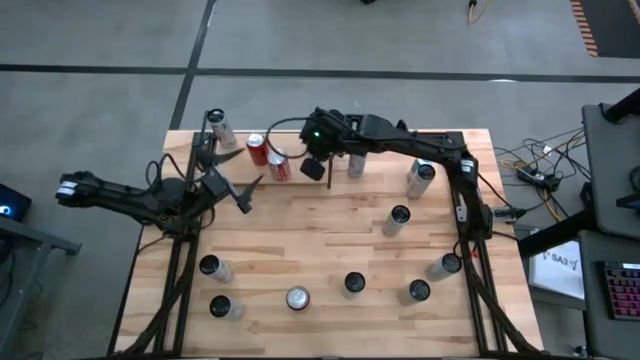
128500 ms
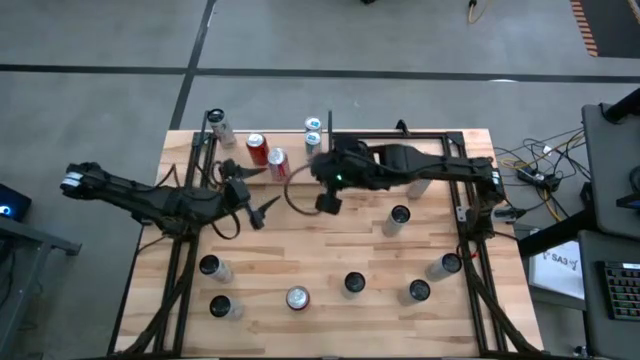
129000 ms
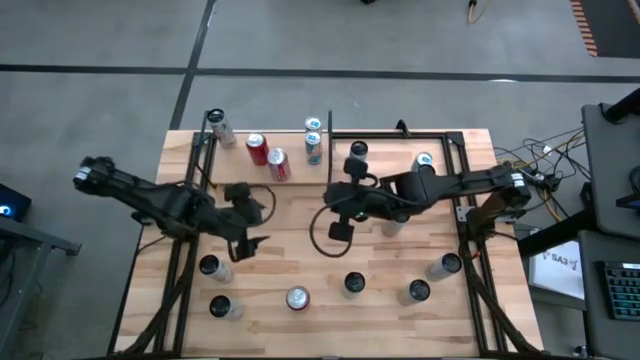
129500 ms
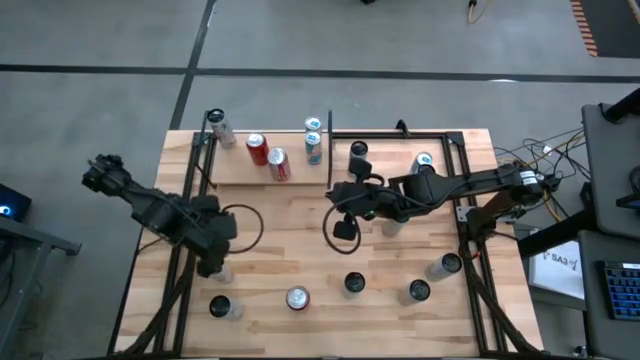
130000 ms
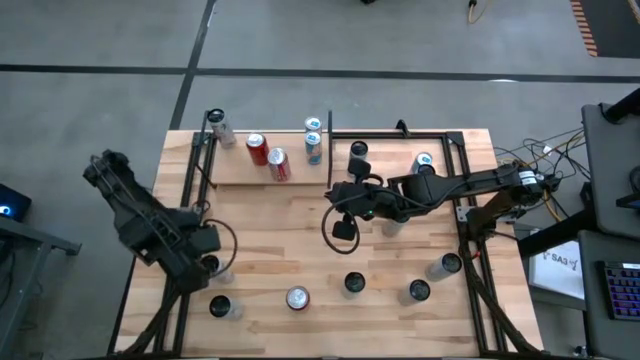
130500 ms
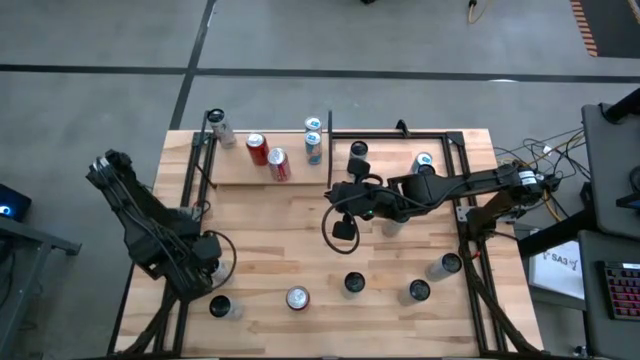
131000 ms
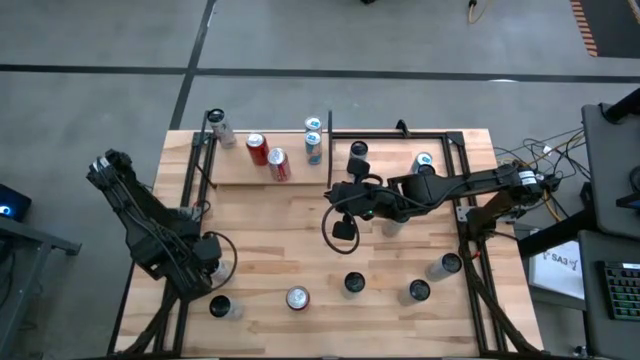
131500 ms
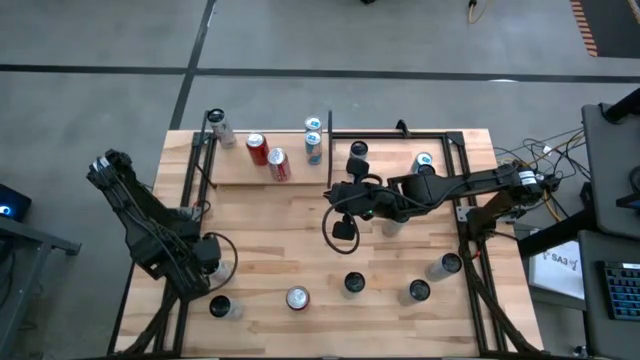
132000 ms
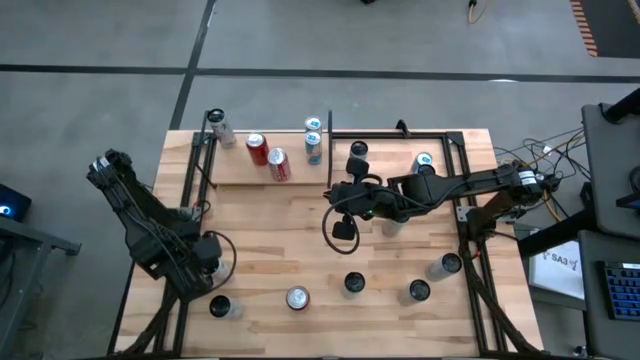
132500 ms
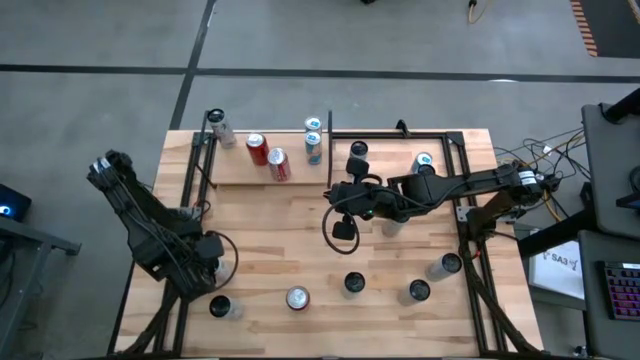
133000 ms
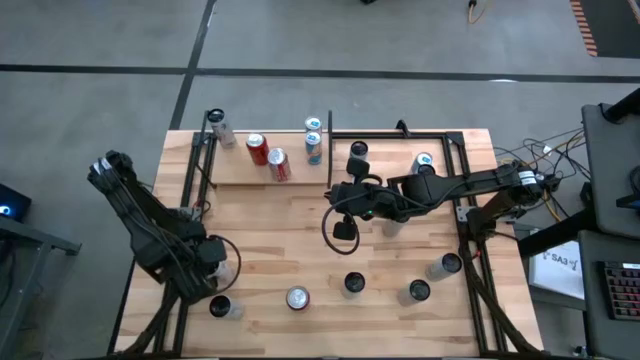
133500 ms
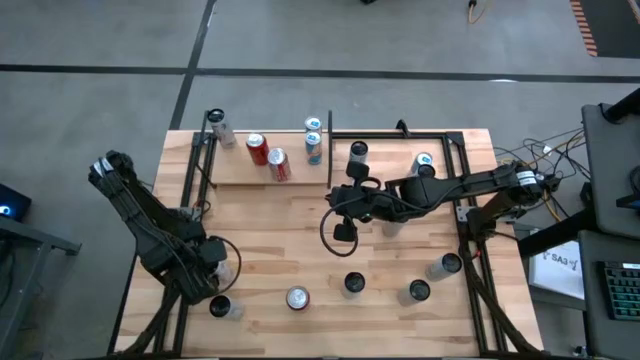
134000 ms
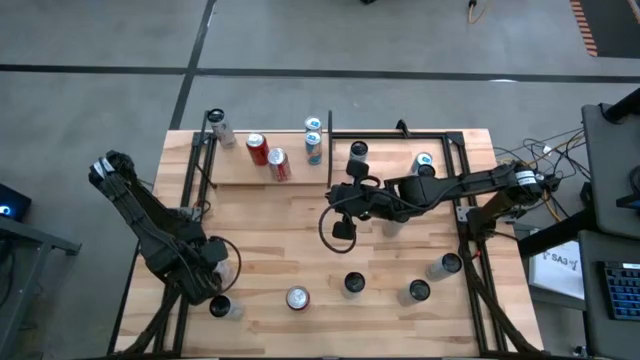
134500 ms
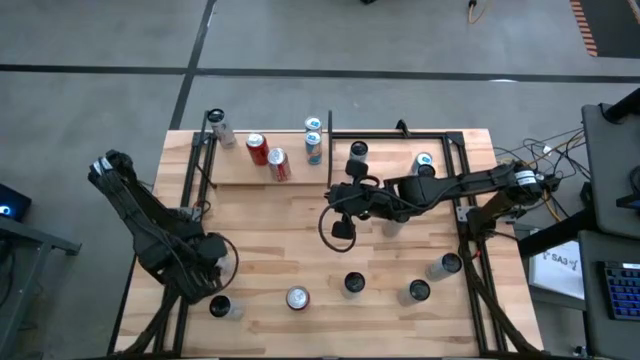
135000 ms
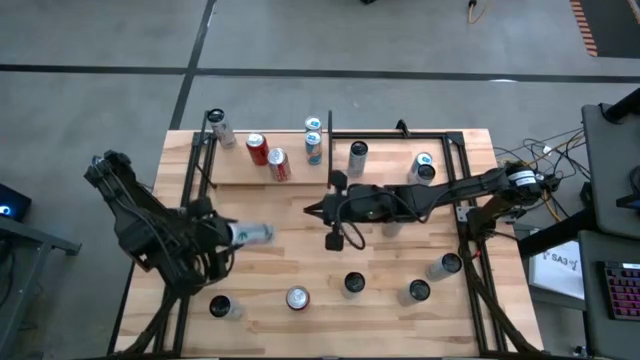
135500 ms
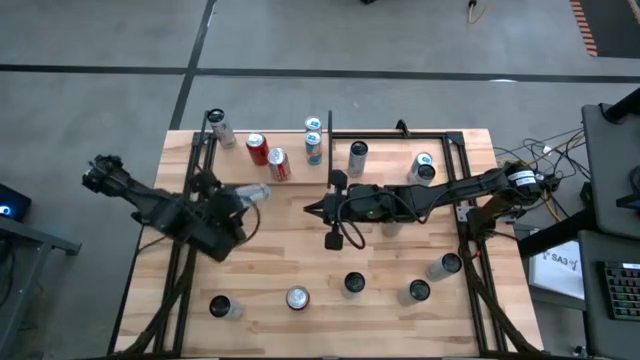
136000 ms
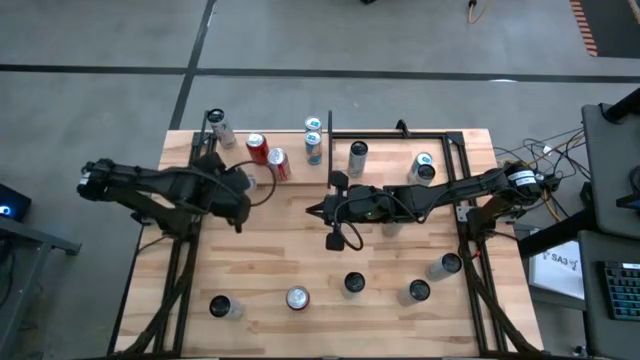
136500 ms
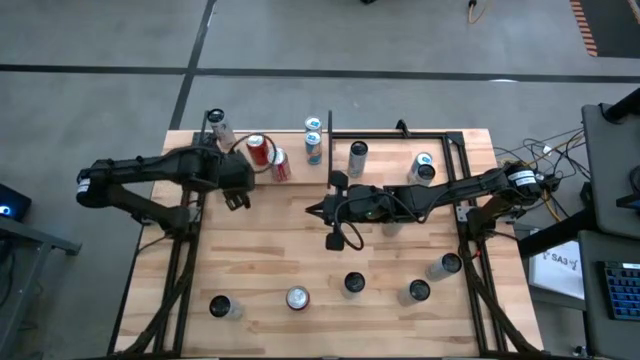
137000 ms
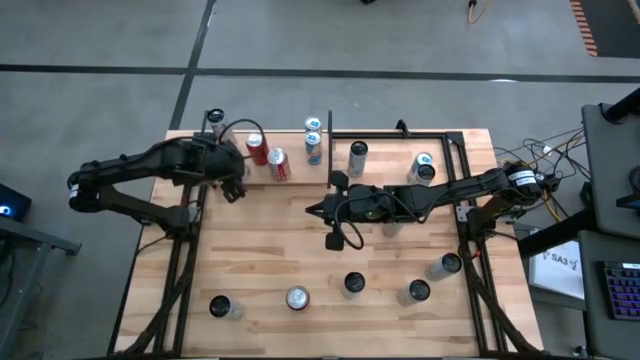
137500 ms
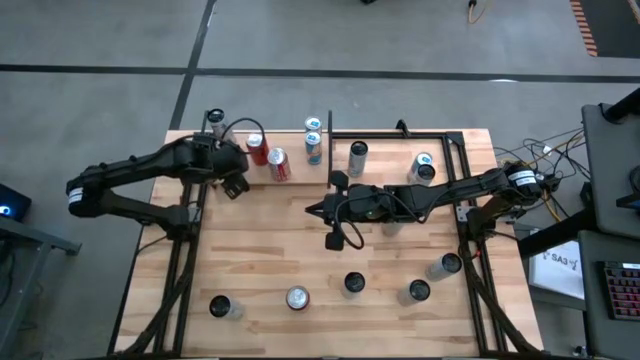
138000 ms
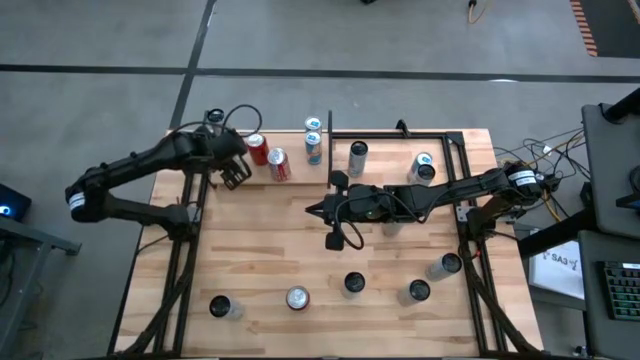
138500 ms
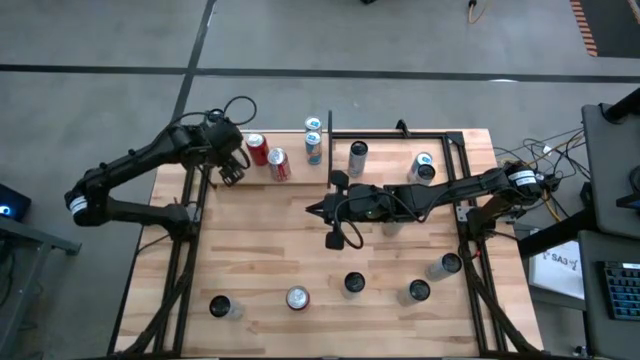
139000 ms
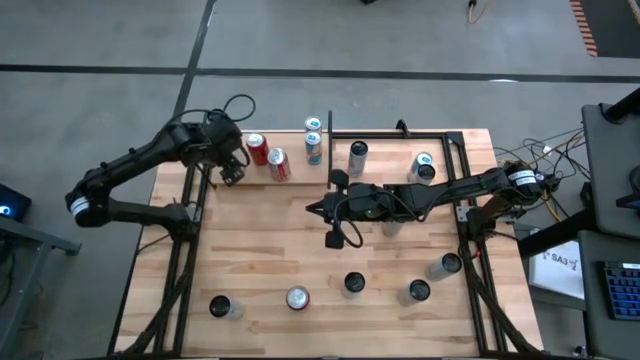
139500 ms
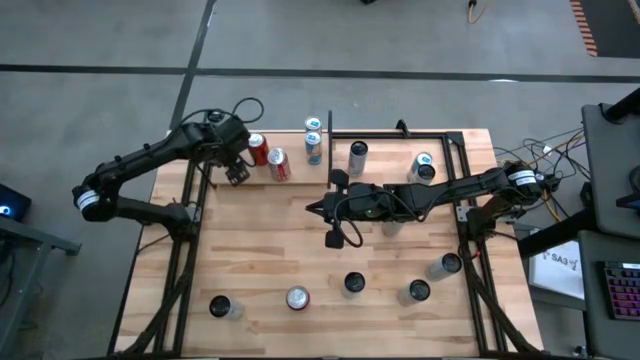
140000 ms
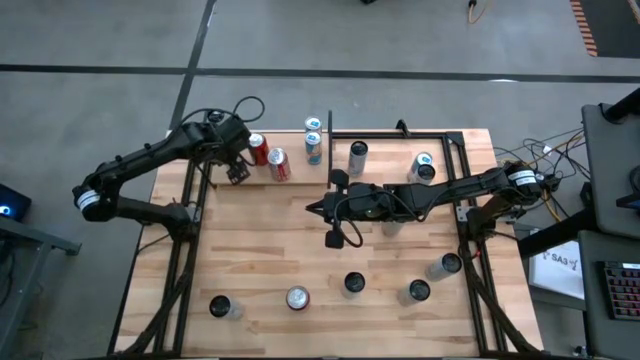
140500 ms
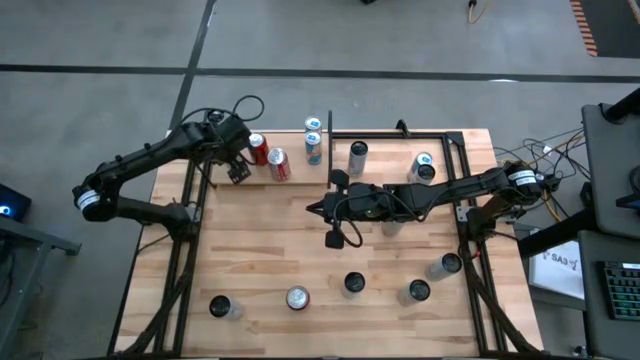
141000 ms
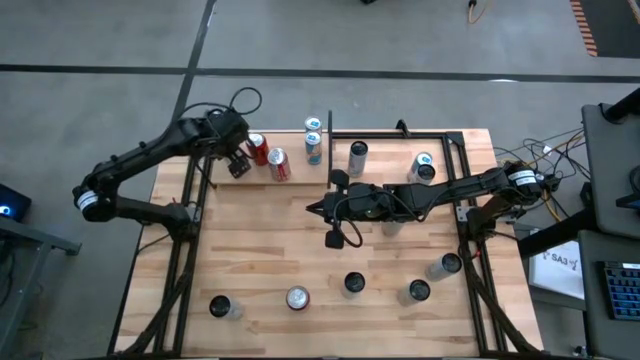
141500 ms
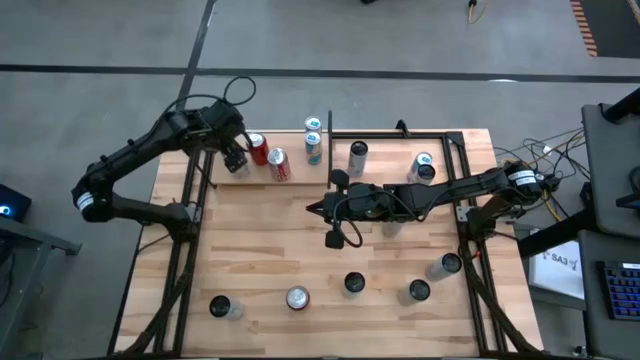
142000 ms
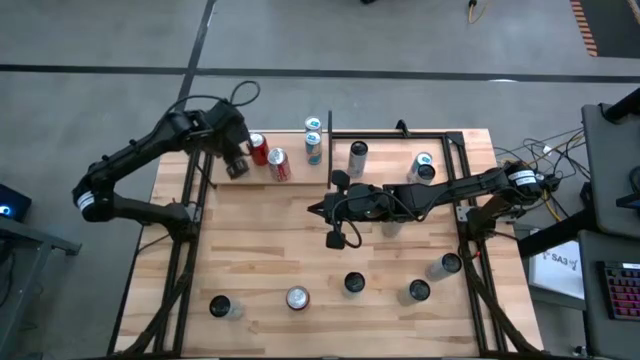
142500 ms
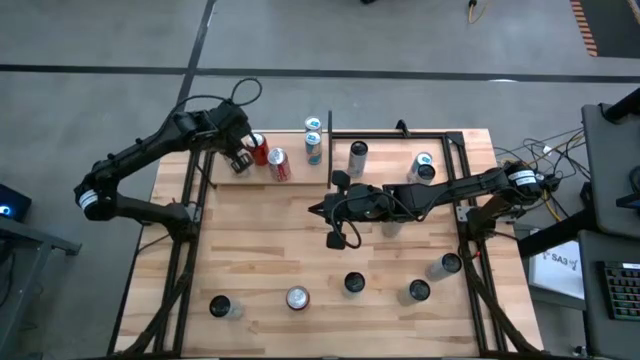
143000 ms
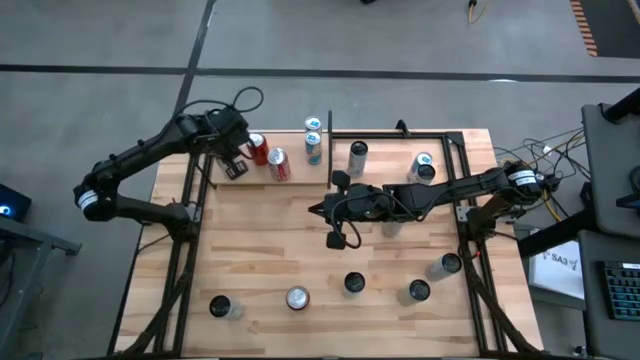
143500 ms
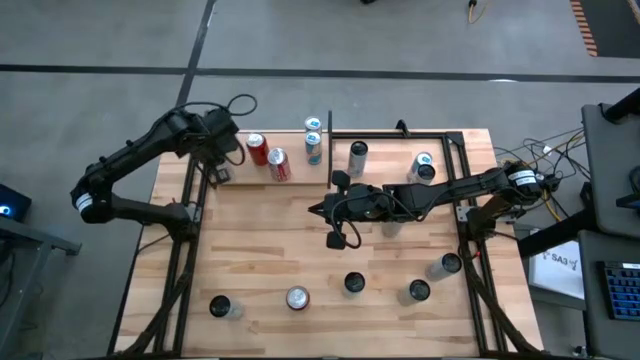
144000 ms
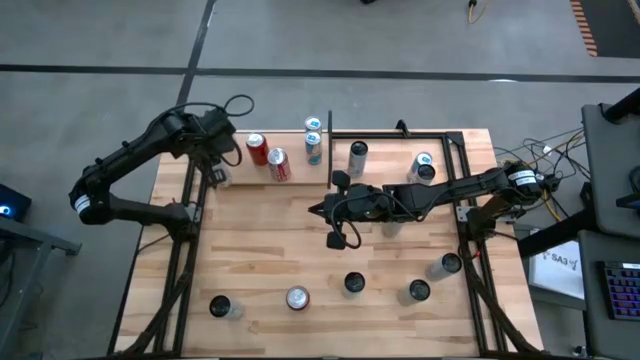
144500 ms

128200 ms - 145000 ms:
Task: Place canned beverage on shelf
Put the top white and pink soda can on the shelf aligned with the other white and pink soda can

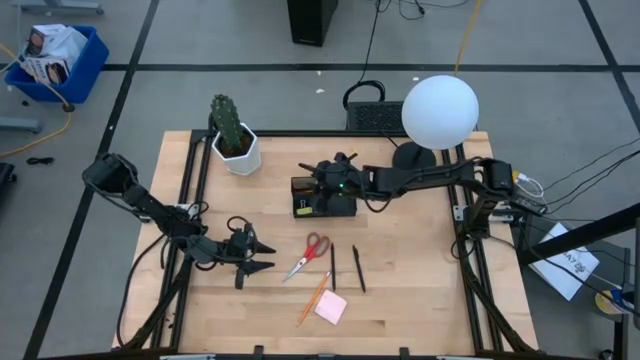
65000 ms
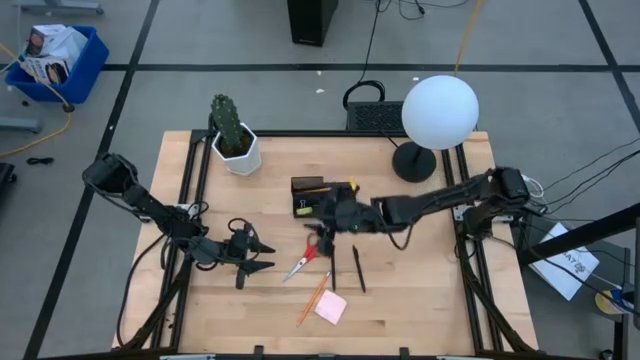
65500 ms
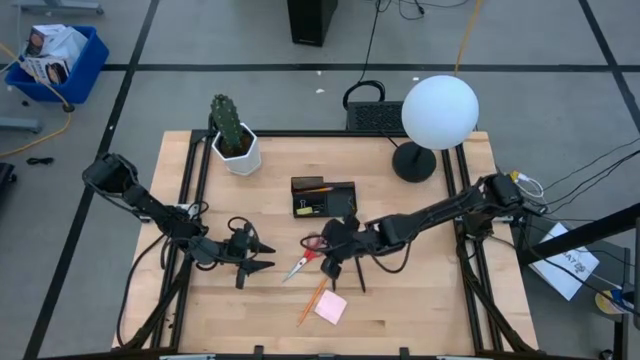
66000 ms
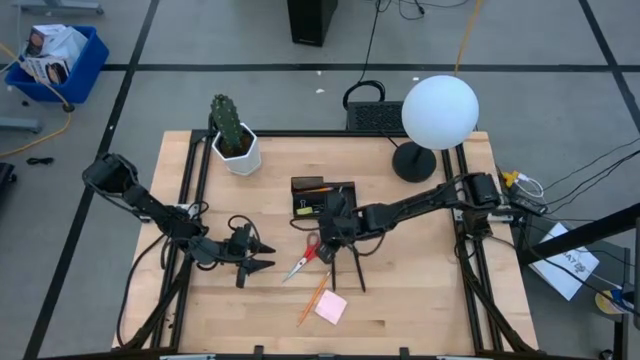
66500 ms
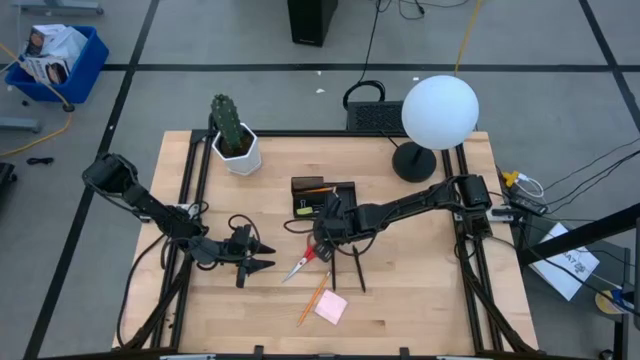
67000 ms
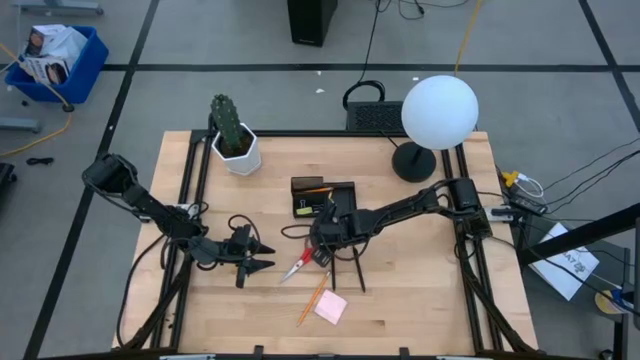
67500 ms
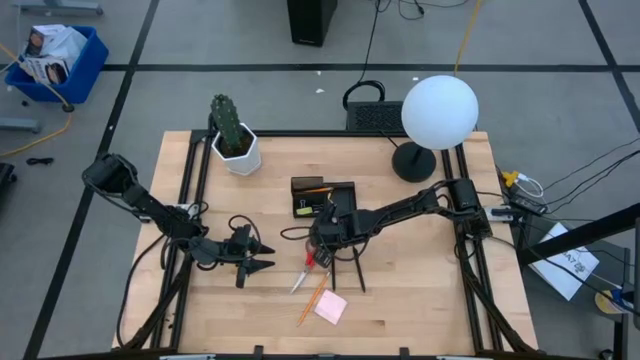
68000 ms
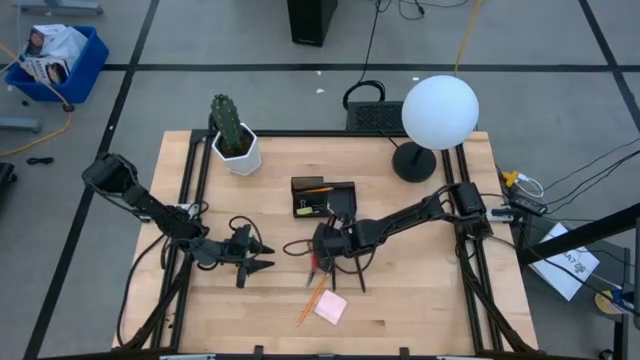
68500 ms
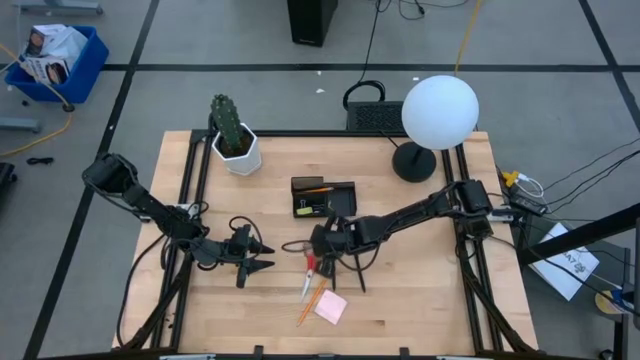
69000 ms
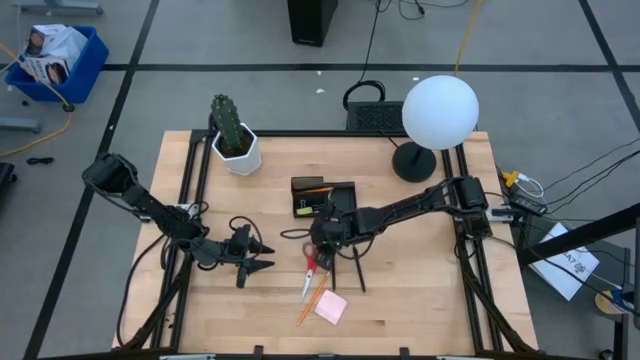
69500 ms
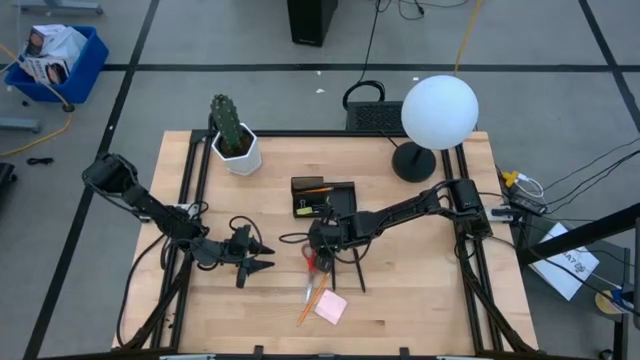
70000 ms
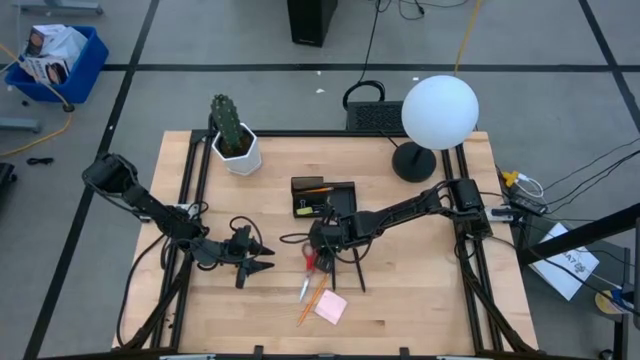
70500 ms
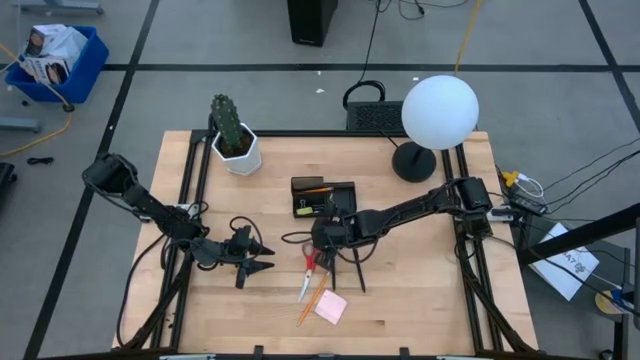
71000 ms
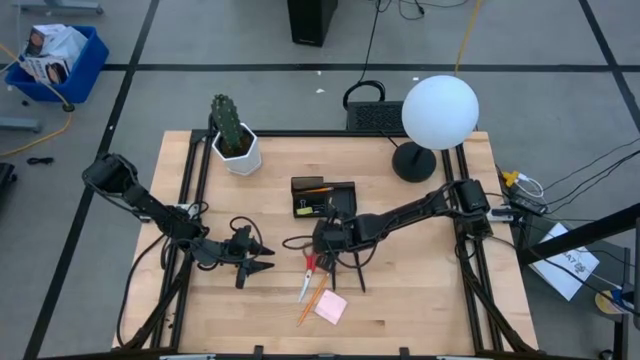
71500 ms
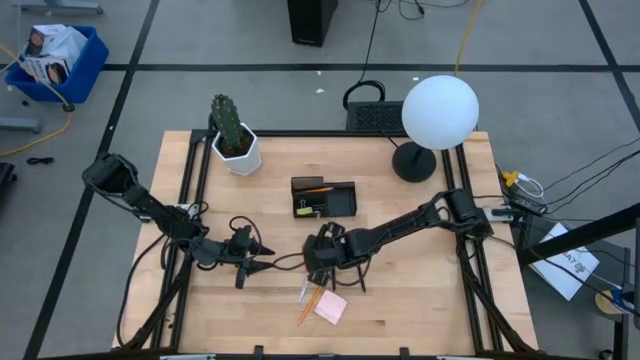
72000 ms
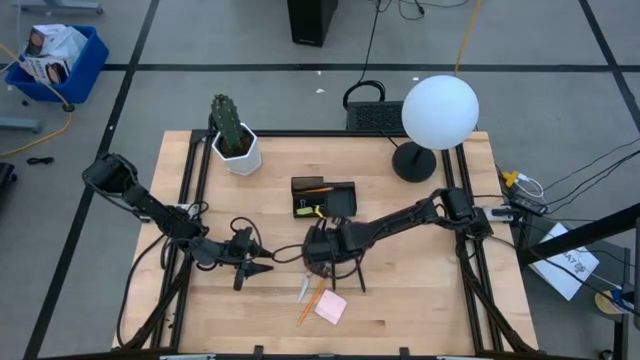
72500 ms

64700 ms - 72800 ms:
Task: Pick and place office supplies into organizer
Put the red scissors into the top left of the desk organizer
